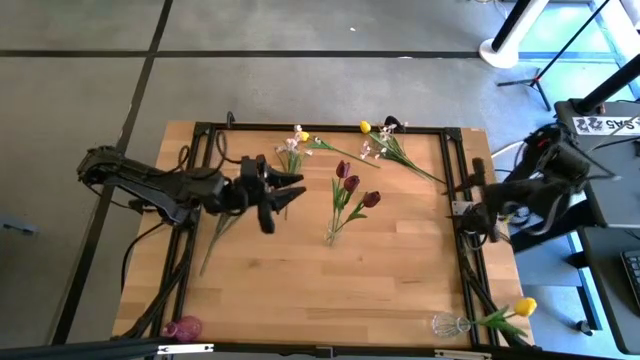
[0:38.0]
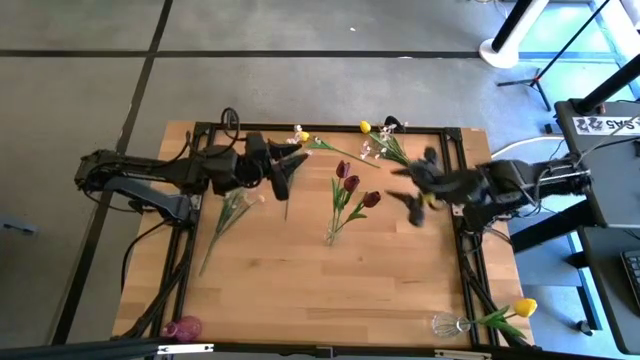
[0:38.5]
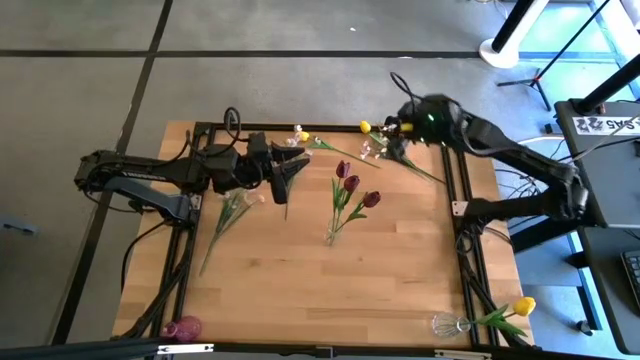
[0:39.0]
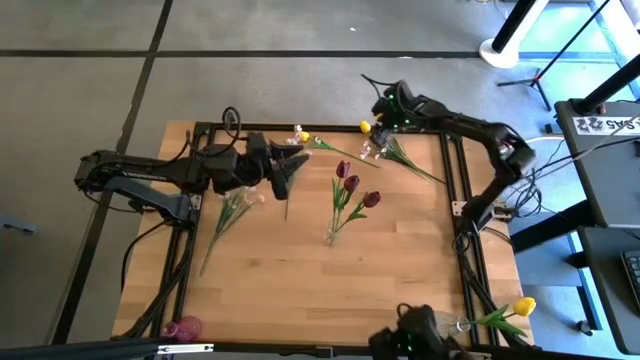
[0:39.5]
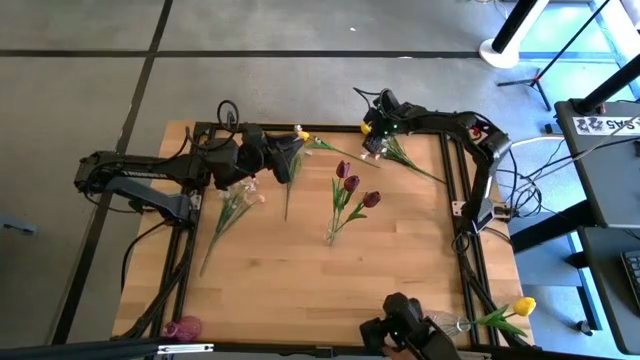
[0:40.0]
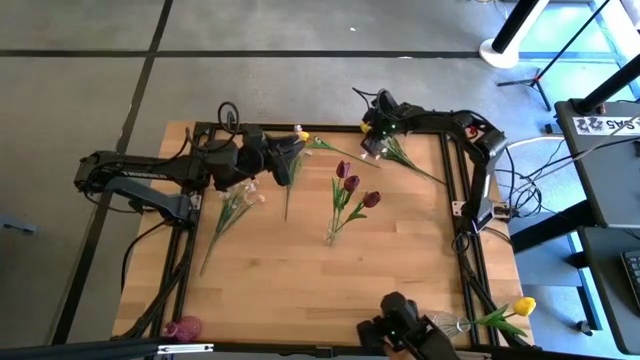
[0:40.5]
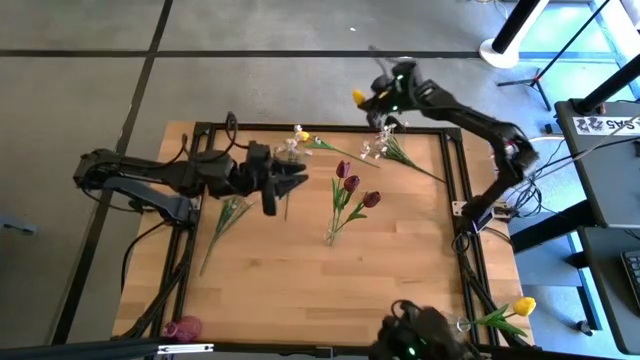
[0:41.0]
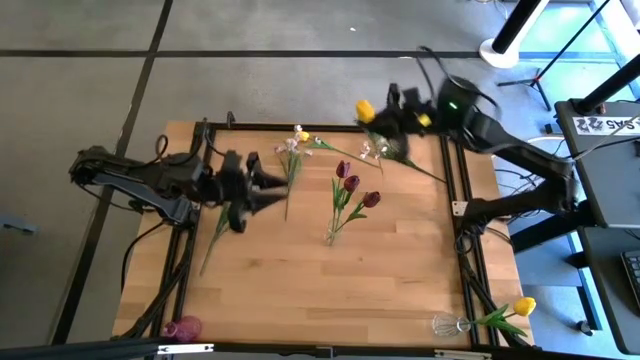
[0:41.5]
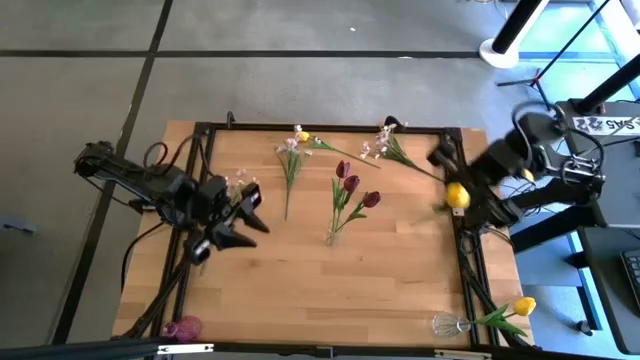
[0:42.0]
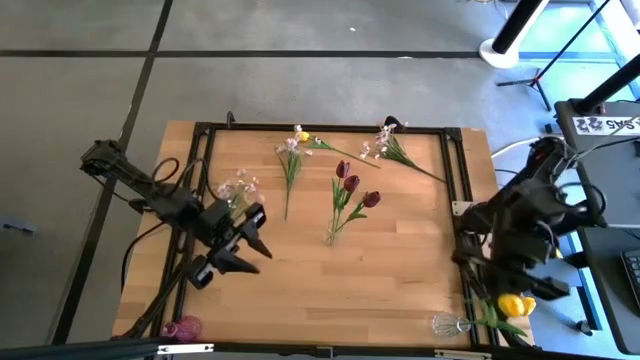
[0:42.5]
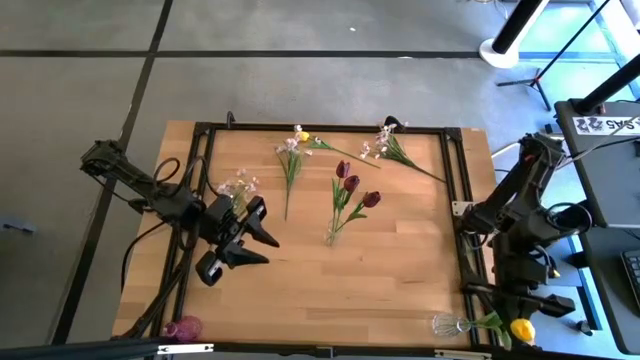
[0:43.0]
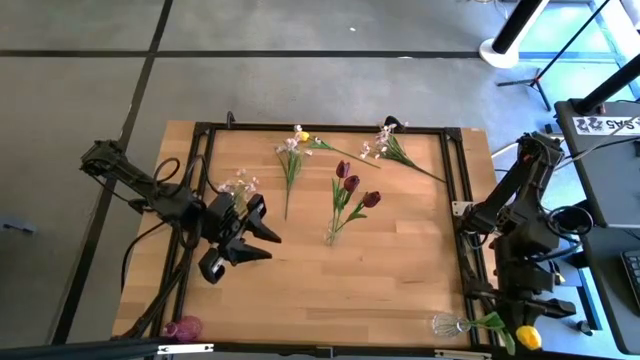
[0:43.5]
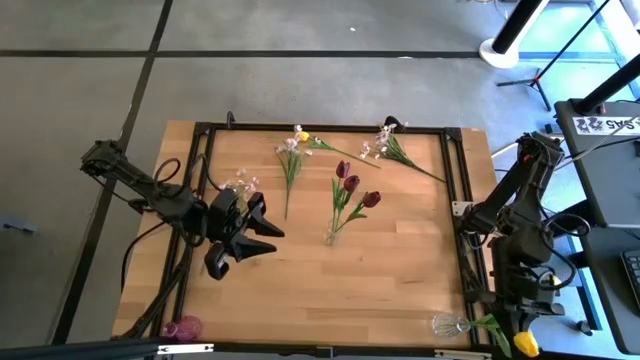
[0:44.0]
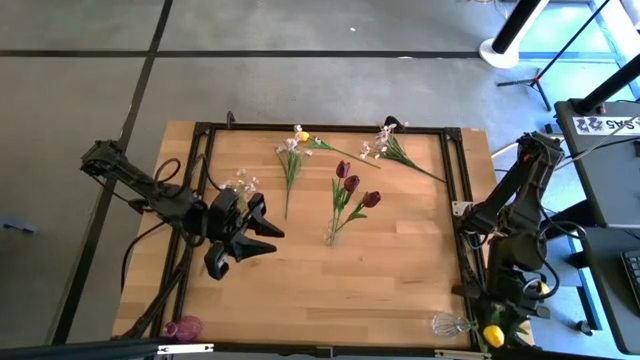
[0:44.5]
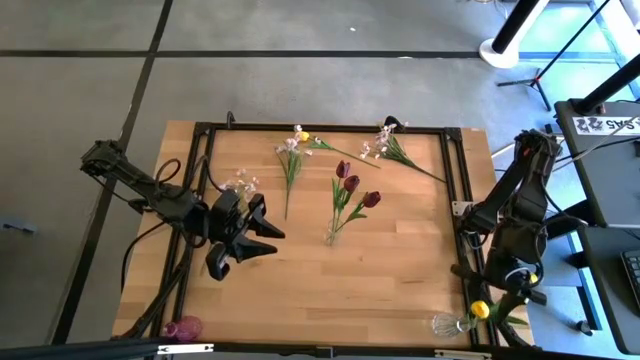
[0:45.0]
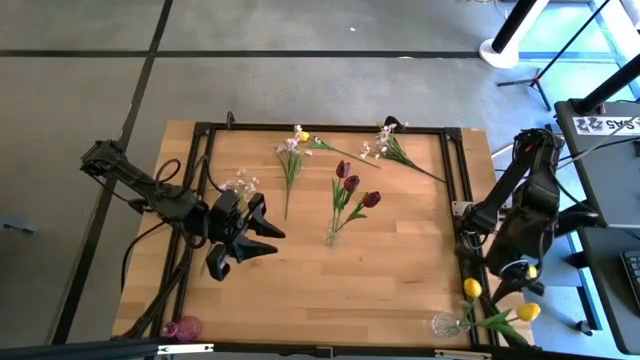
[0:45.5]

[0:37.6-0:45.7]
Task: Sort flowers into vase by color
Put the right yellow tulip into the bottom transparent vase

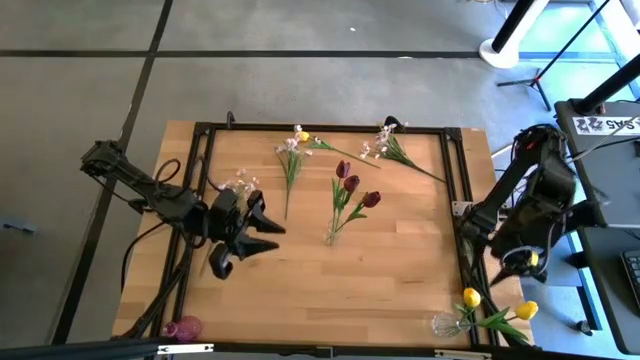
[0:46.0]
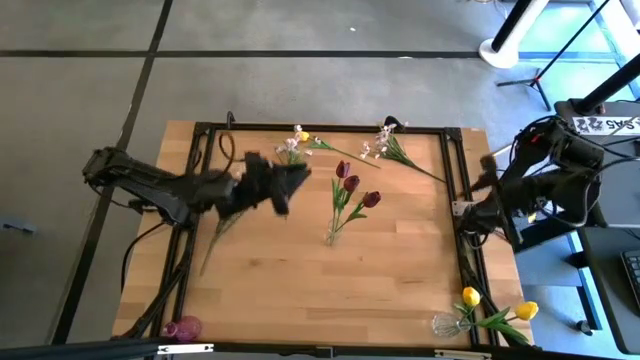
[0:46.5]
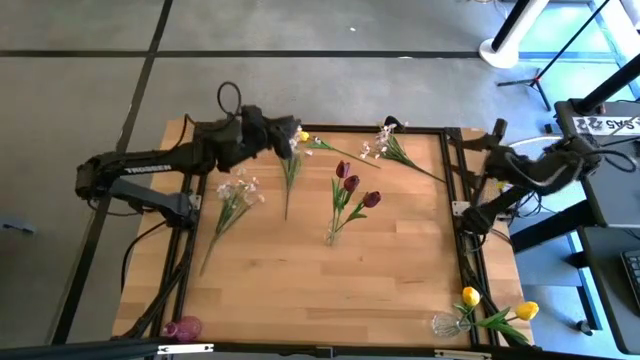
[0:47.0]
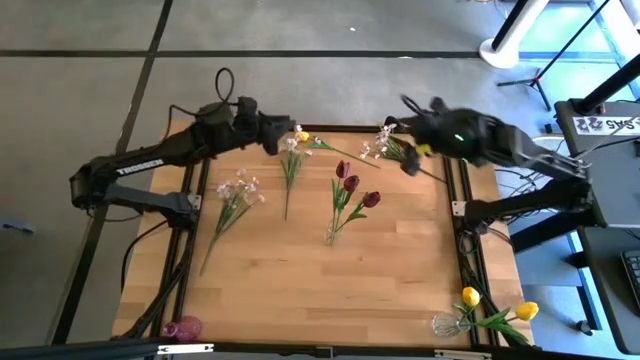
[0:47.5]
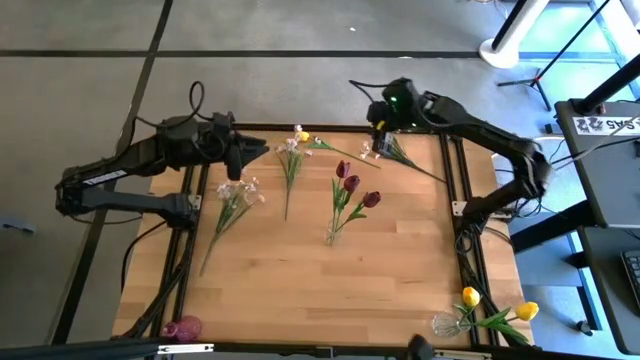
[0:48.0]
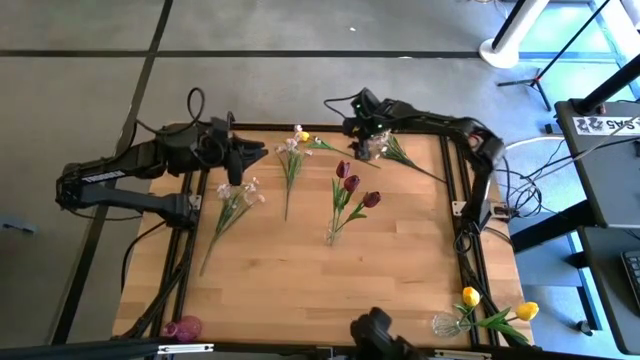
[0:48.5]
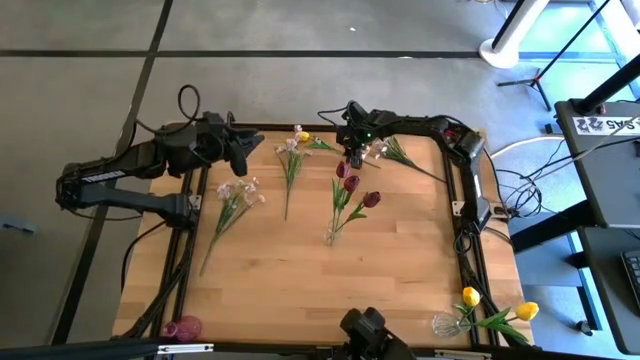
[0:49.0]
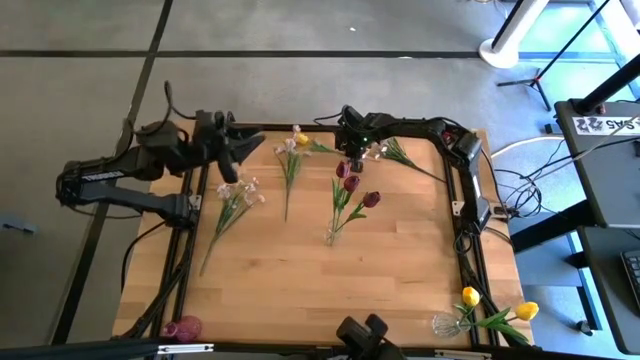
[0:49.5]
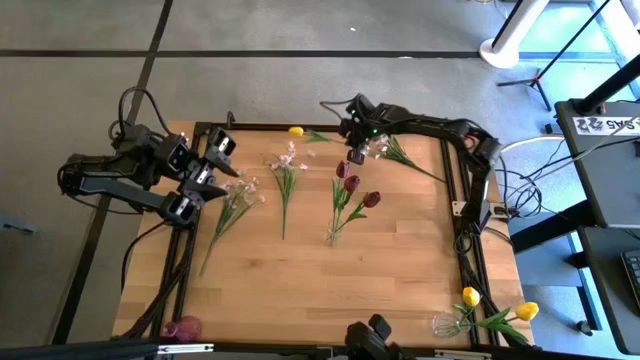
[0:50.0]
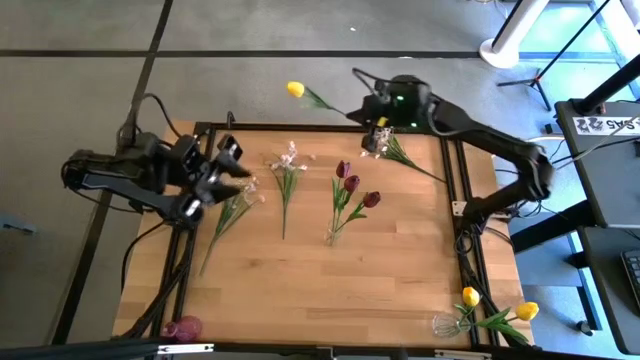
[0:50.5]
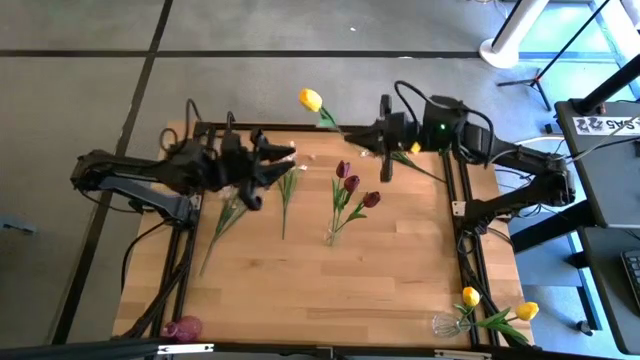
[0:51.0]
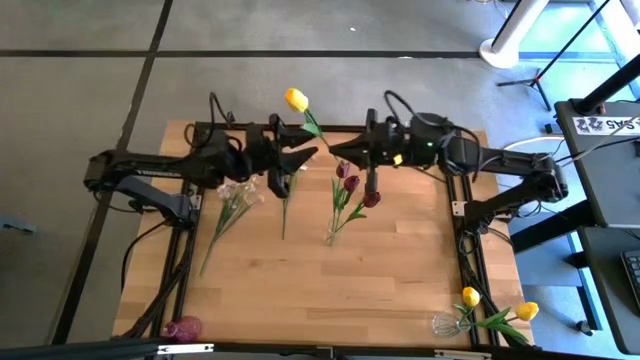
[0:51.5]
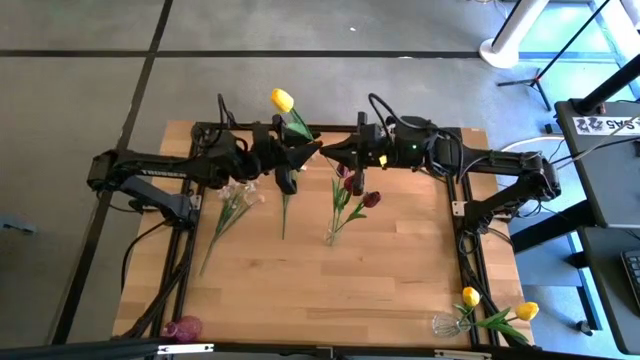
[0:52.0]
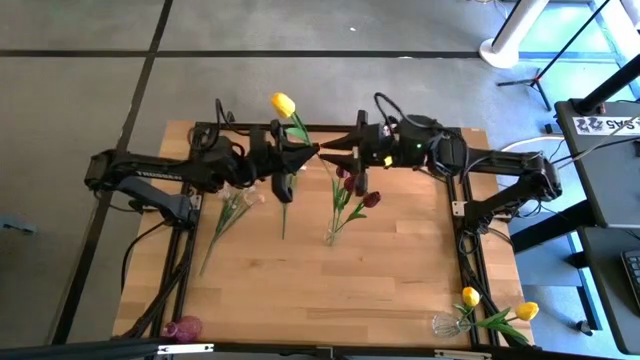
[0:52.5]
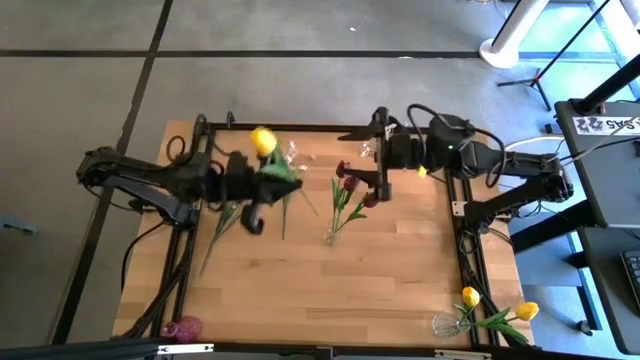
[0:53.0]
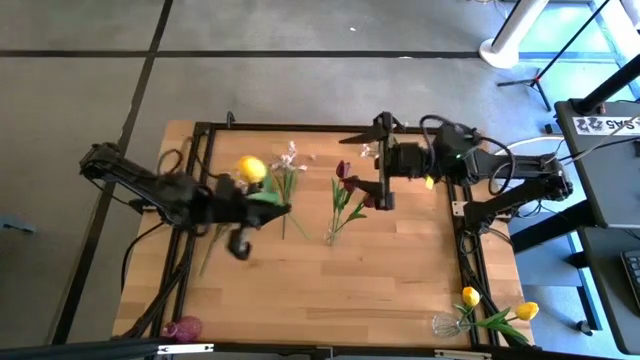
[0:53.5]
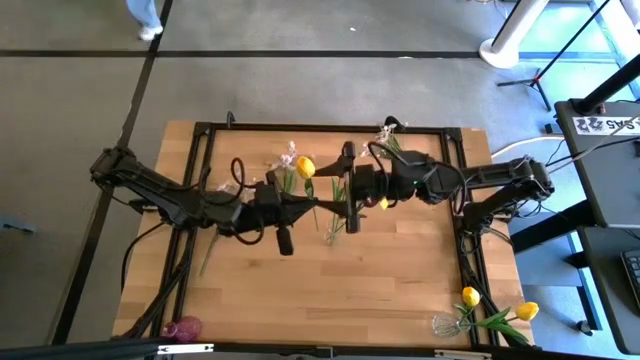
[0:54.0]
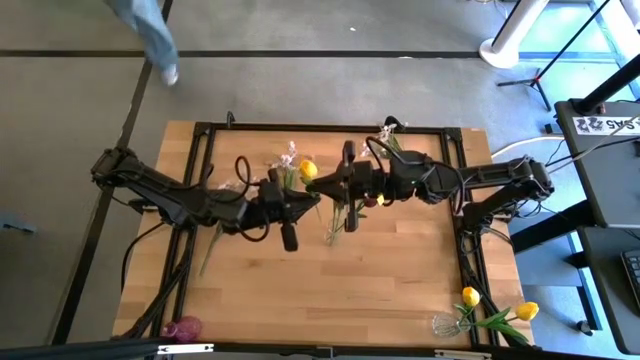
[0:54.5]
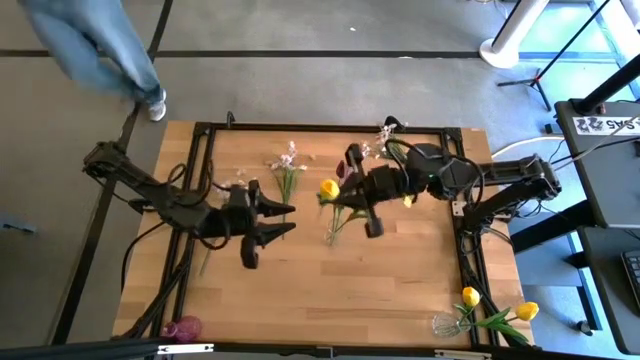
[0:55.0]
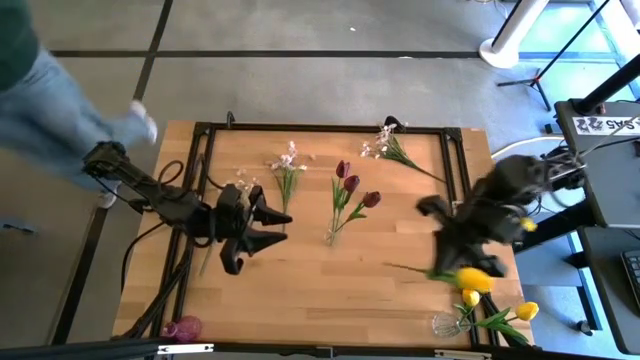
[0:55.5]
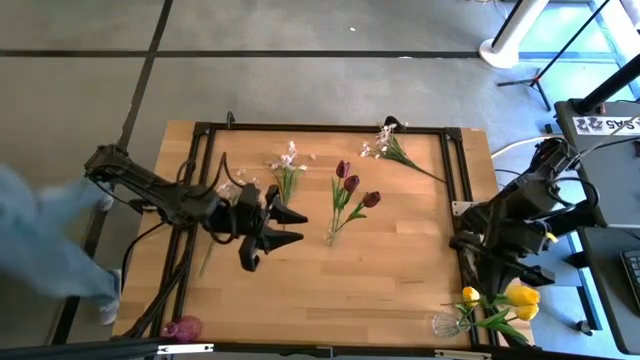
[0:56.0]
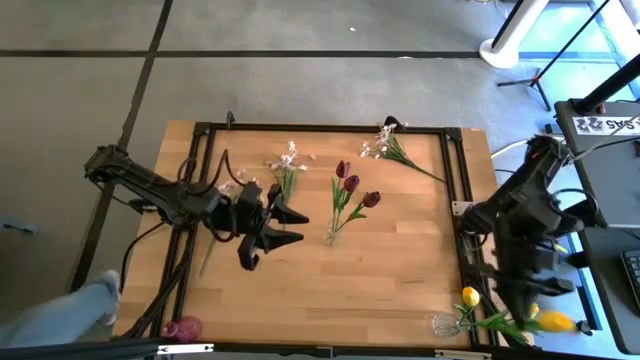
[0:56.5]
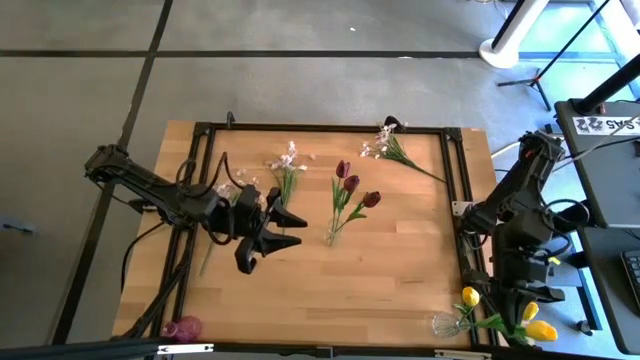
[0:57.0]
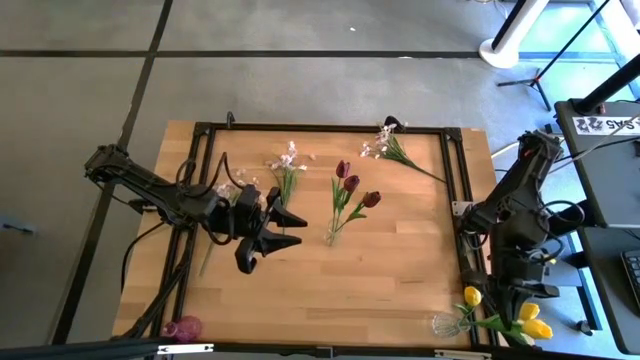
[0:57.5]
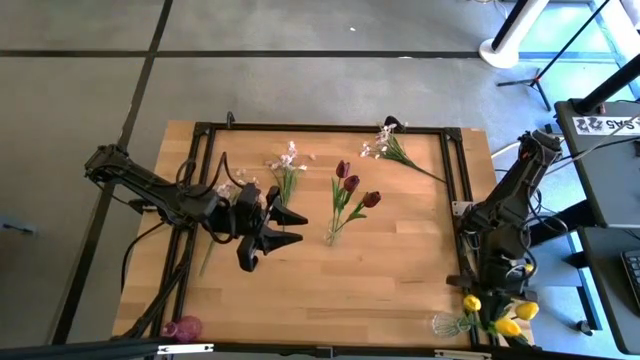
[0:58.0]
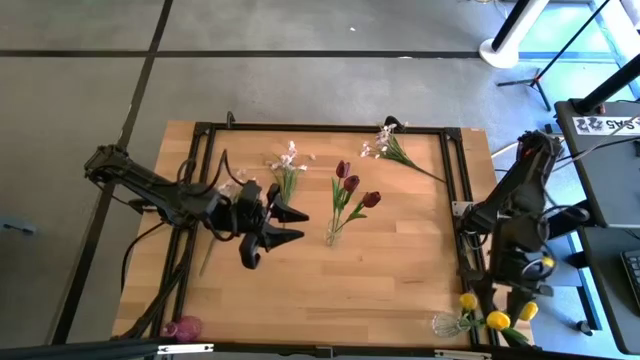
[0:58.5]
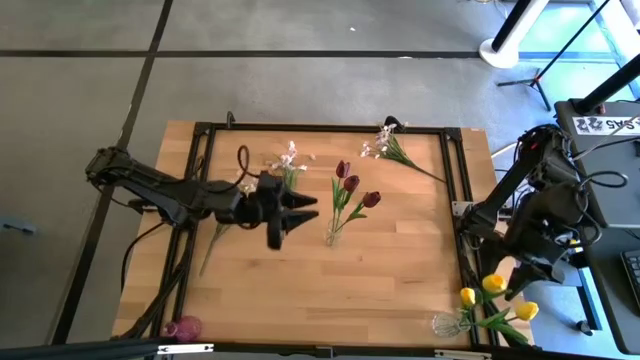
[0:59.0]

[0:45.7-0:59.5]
Put the yellow tulip into the bottom transparent vase
